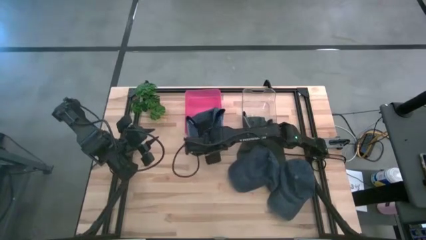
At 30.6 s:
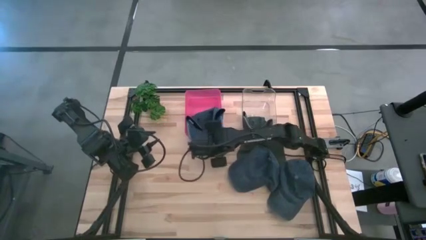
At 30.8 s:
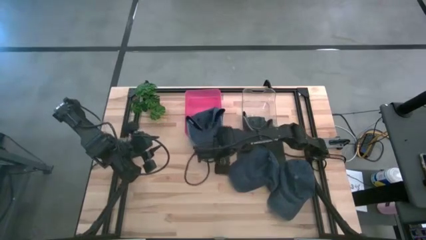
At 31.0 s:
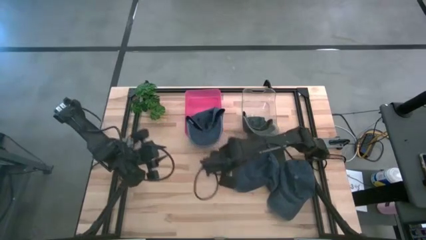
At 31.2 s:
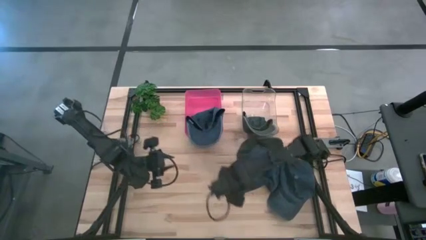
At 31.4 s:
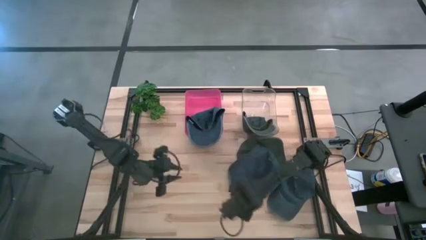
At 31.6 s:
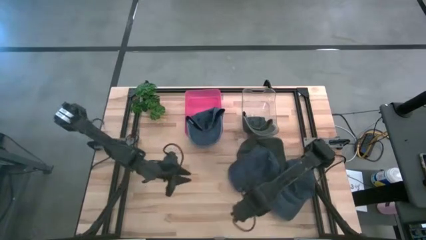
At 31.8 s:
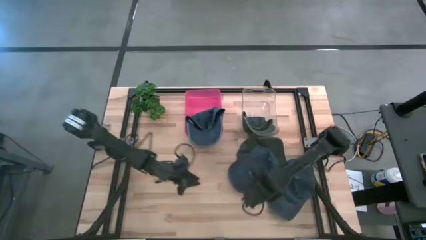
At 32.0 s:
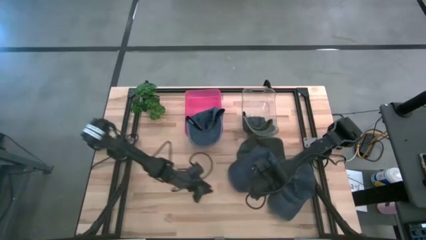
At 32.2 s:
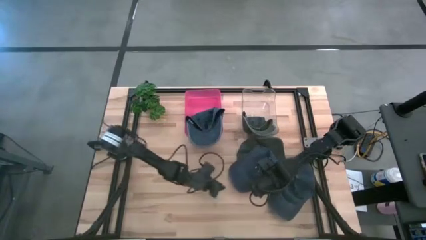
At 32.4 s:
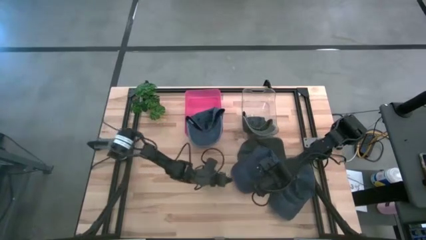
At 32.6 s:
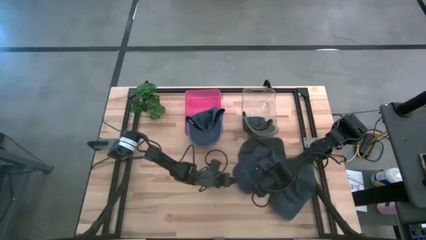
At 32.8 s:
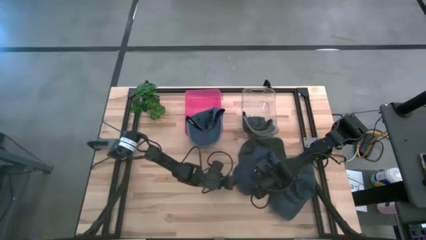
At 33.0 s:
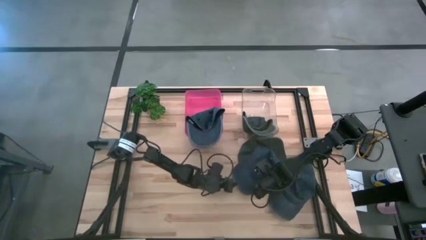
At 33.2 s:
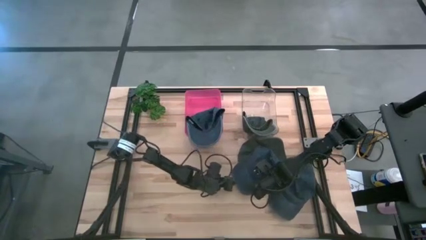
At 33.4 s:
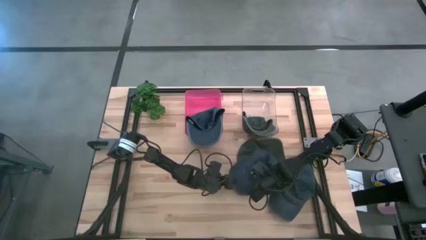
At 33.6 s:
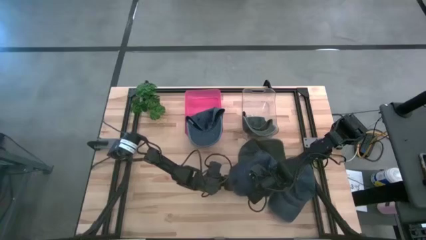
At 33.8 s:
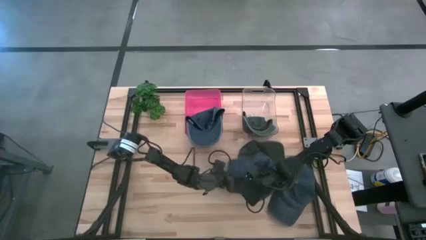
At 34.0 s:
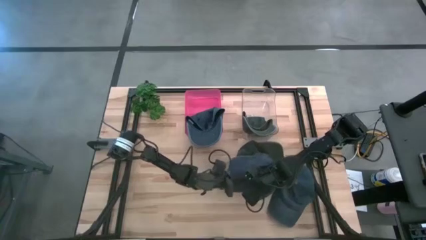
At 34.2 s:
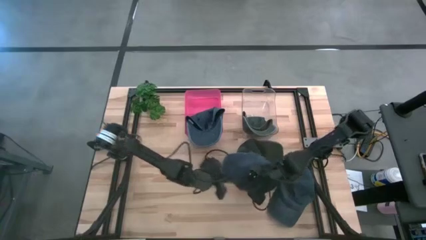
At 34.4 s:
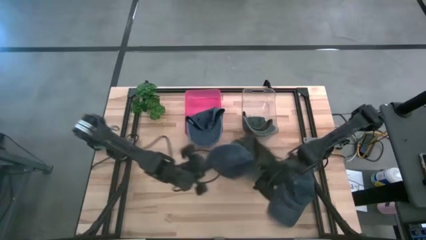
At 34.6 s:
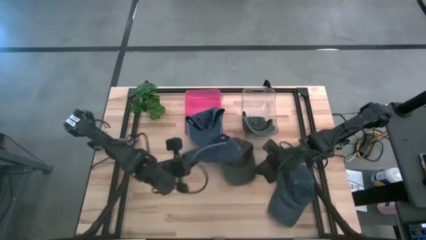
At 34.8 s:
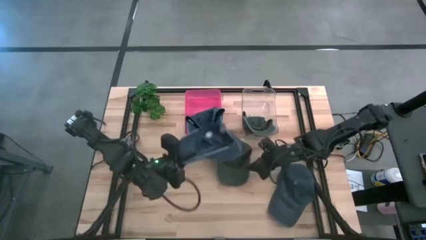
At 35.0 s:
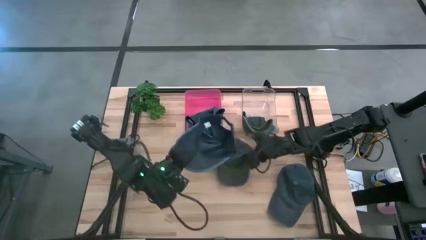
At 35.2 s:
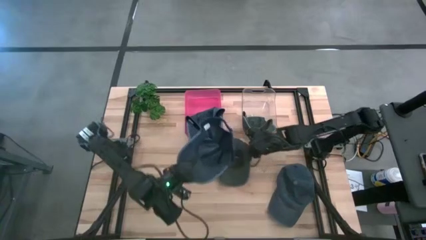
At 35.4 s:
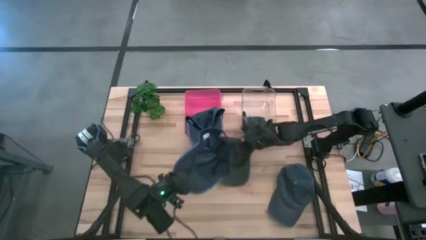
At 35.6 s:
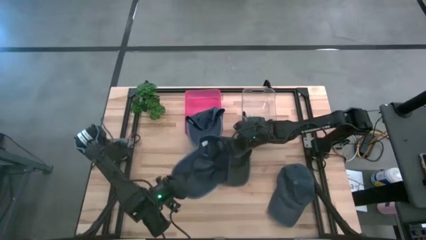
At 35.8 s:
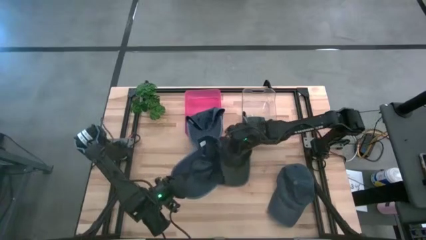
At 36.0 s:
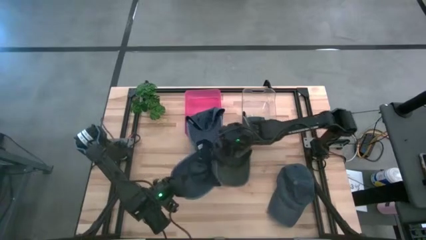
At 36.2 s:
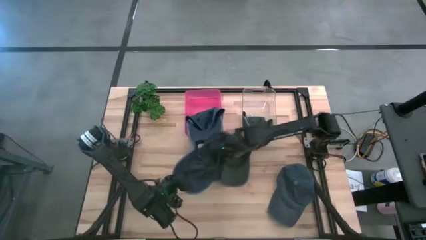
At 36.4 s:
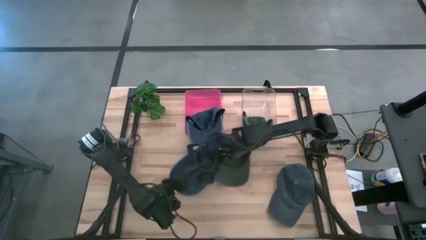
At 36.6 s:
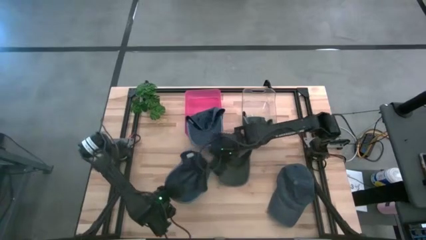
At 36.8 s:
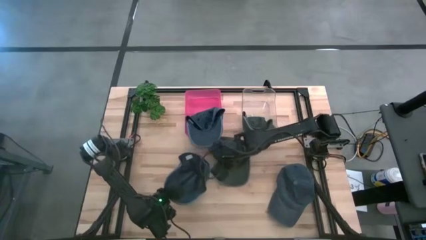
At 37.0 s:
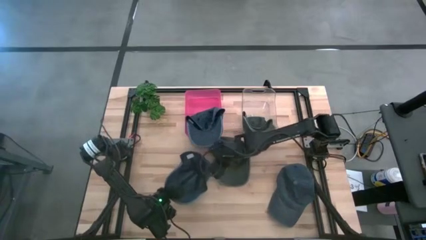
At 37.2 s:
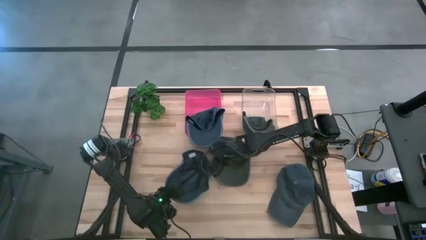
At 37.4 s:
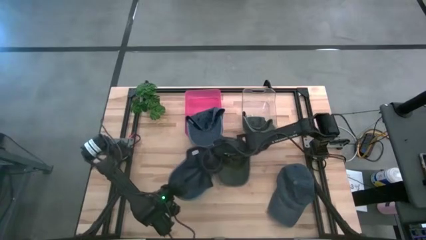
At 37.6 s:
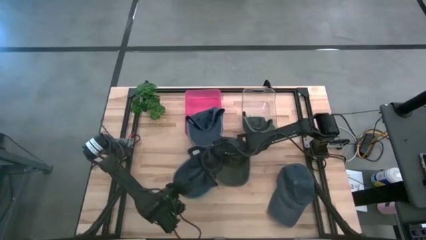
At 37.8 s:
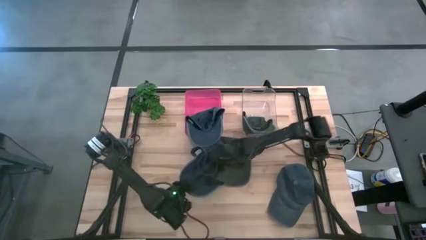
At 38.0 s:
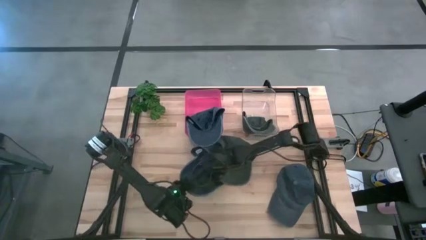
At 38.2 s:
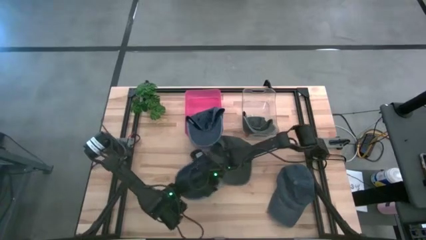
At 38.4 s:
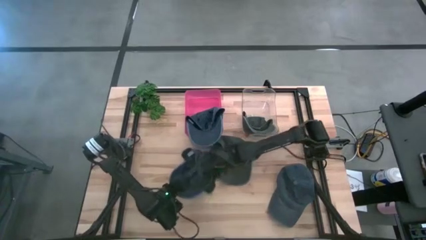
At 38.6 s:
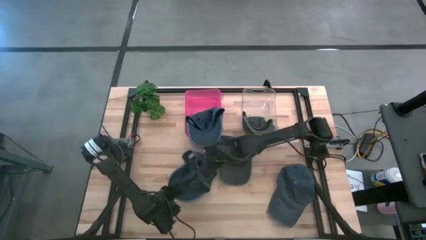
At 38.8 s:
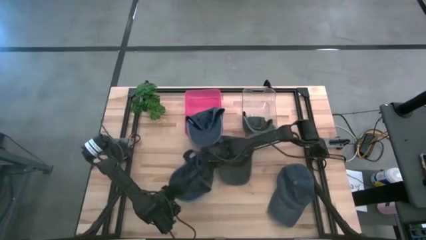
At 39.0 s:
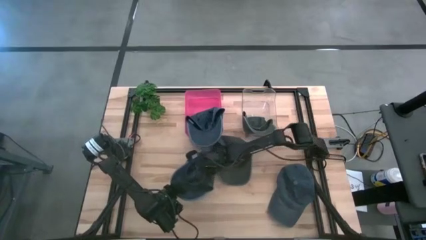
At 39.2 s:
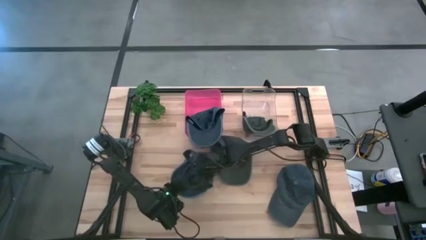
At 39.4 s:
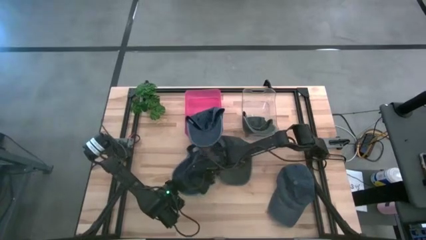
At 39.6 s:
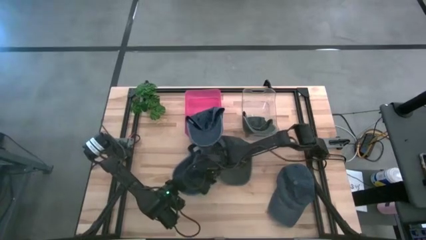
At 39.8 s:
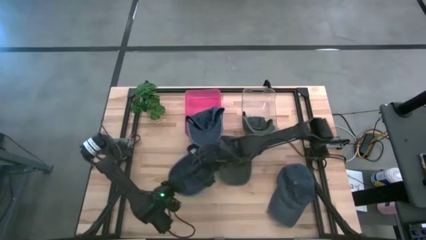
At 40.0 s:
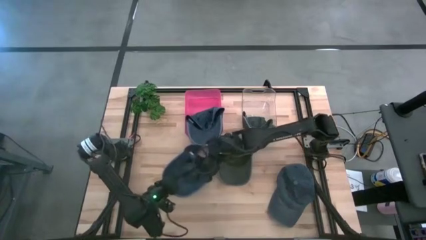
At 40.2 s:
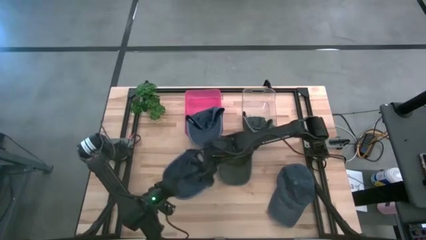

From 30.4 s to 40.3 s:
Task: Pick & Place hat
Put the top blue cap into the red bin
